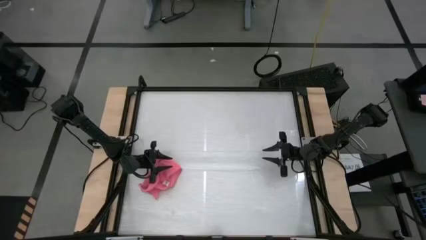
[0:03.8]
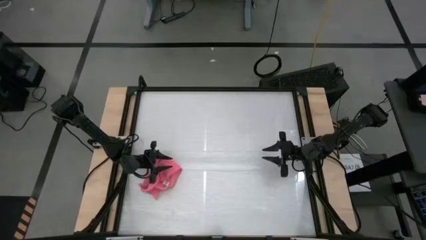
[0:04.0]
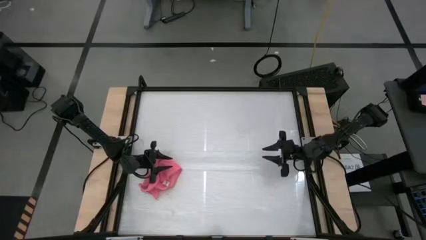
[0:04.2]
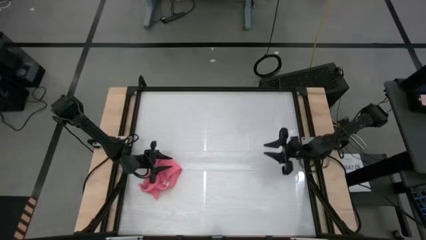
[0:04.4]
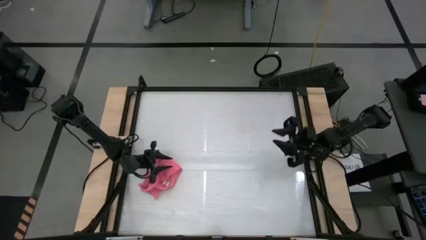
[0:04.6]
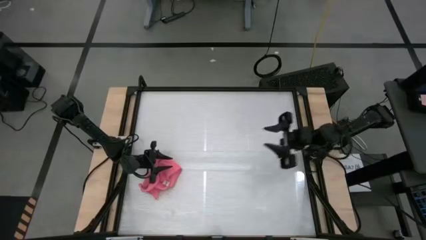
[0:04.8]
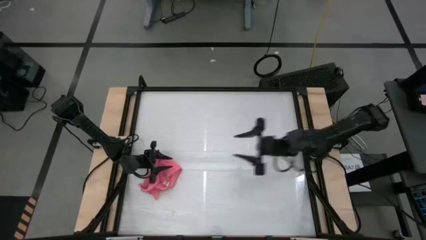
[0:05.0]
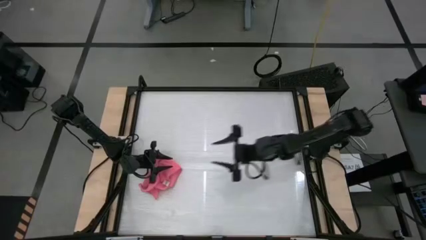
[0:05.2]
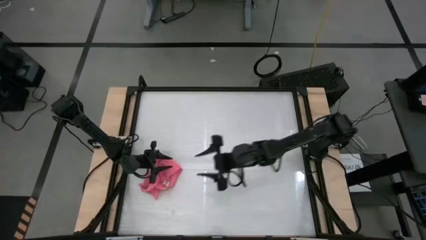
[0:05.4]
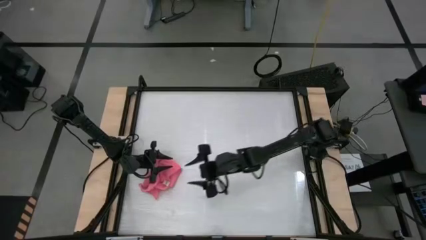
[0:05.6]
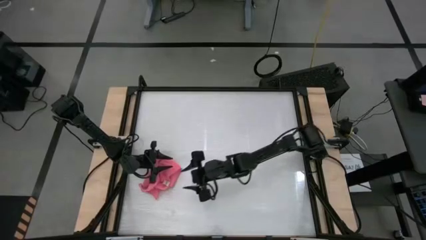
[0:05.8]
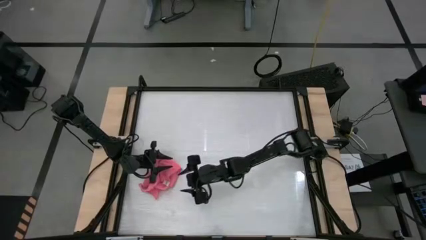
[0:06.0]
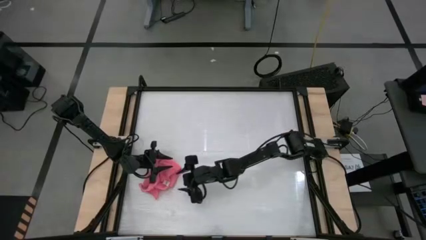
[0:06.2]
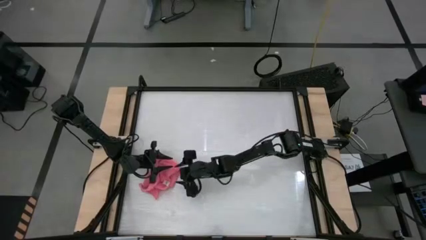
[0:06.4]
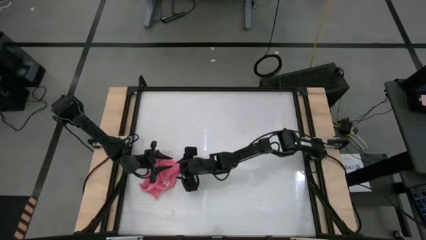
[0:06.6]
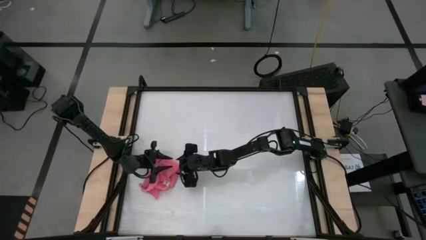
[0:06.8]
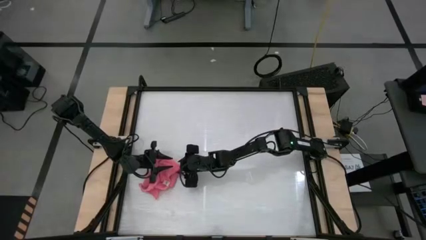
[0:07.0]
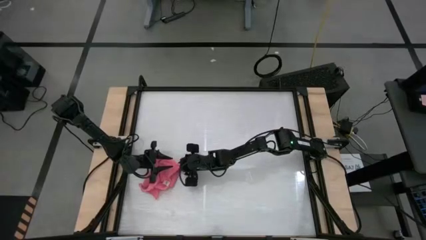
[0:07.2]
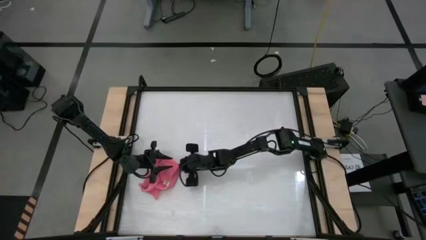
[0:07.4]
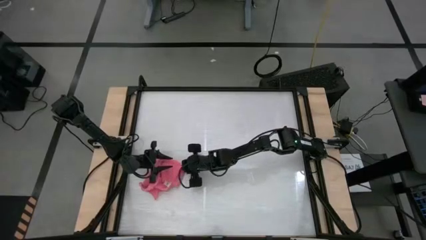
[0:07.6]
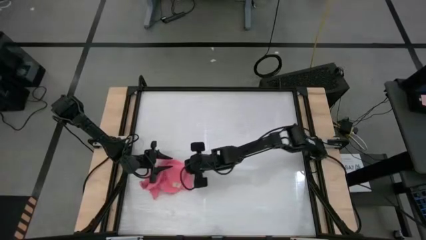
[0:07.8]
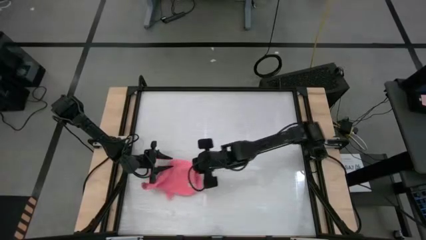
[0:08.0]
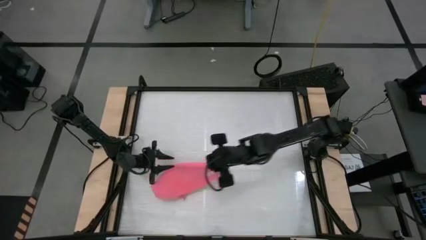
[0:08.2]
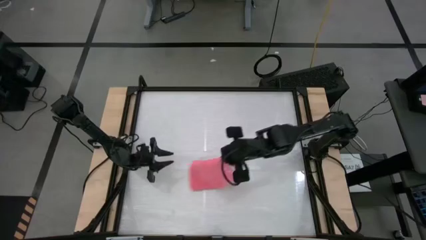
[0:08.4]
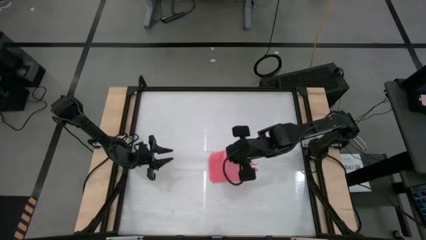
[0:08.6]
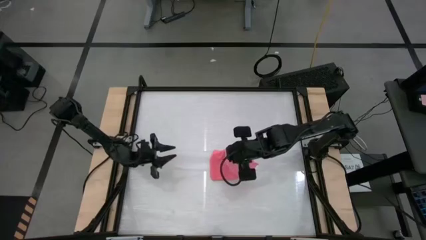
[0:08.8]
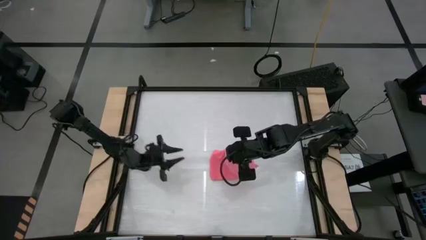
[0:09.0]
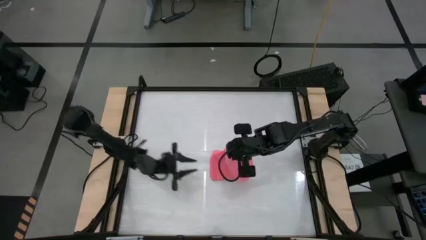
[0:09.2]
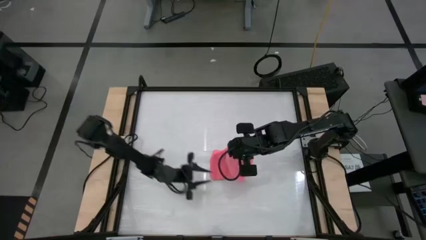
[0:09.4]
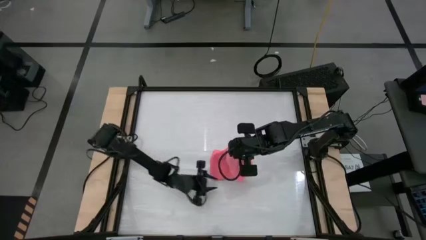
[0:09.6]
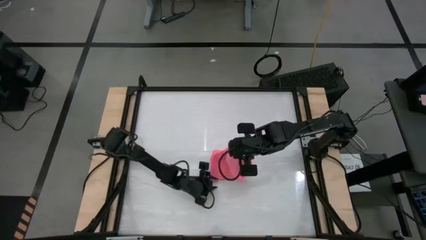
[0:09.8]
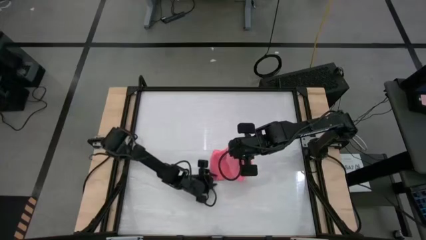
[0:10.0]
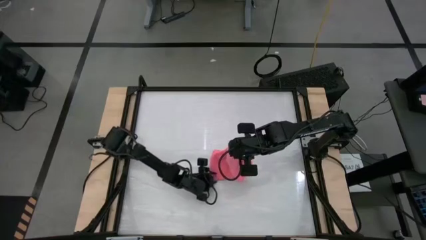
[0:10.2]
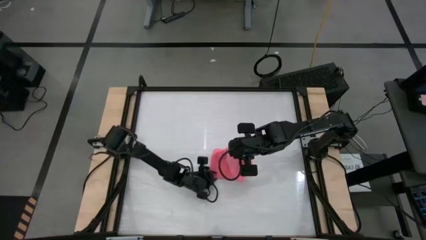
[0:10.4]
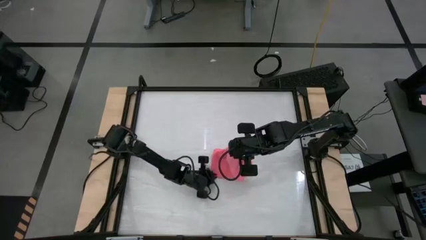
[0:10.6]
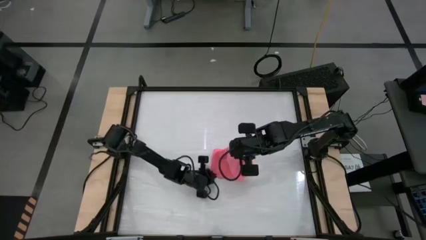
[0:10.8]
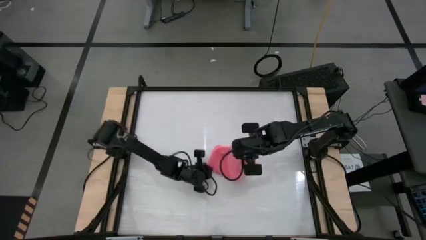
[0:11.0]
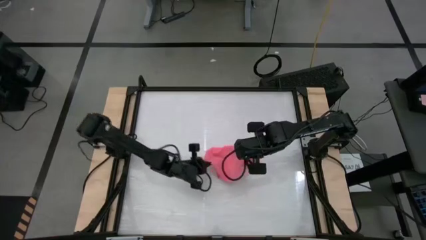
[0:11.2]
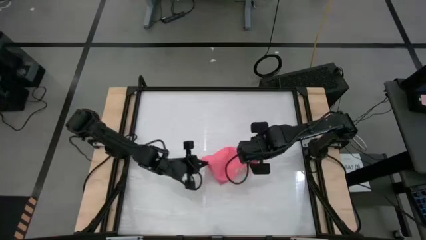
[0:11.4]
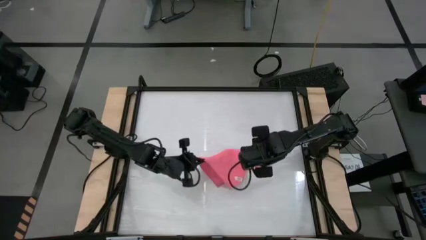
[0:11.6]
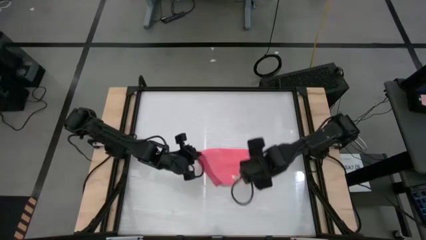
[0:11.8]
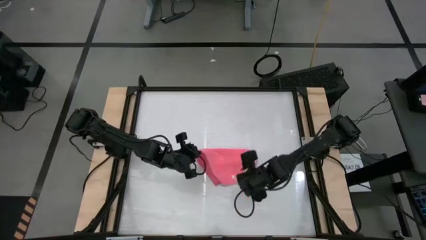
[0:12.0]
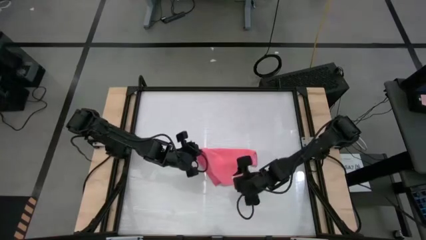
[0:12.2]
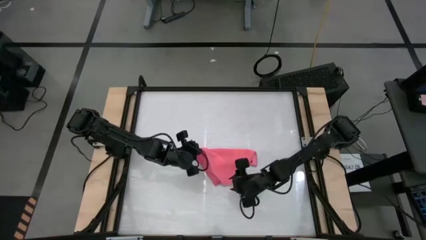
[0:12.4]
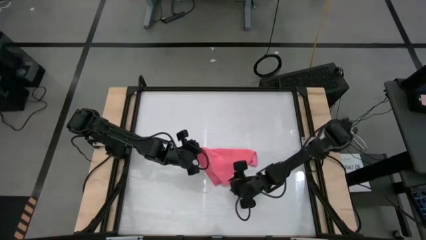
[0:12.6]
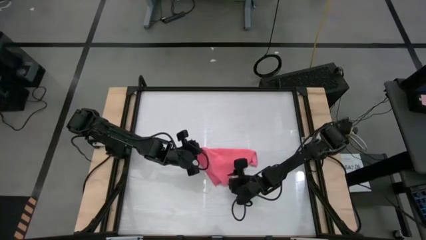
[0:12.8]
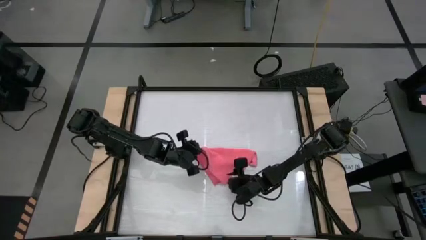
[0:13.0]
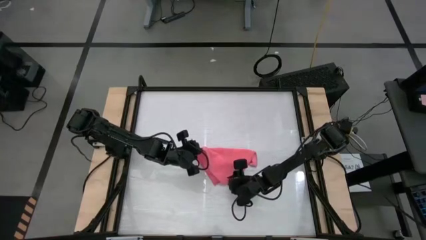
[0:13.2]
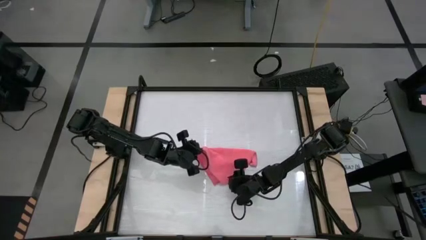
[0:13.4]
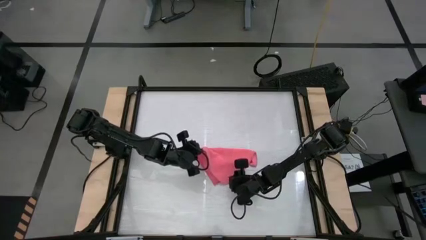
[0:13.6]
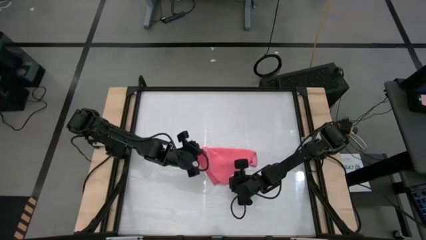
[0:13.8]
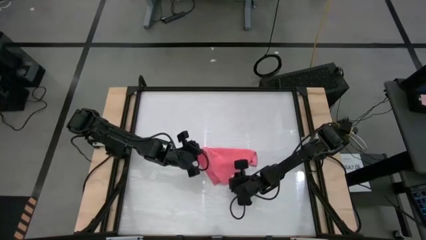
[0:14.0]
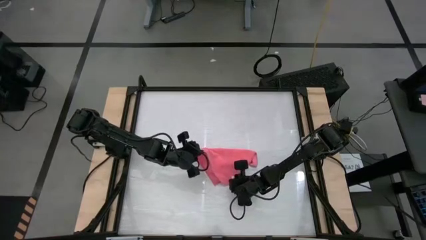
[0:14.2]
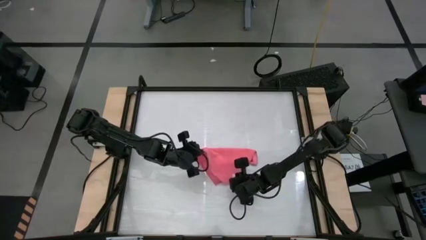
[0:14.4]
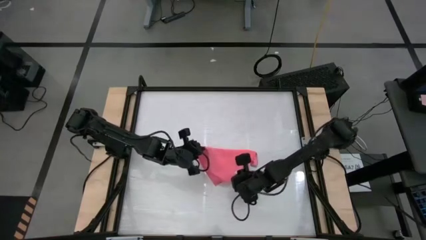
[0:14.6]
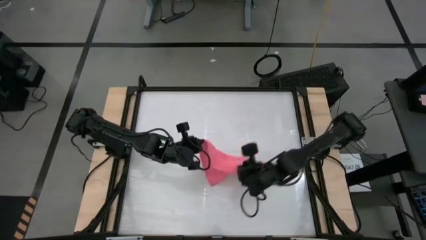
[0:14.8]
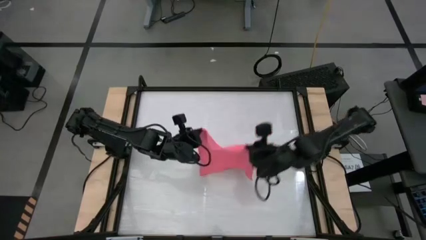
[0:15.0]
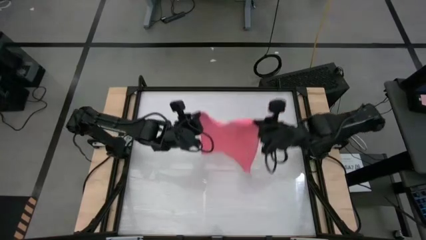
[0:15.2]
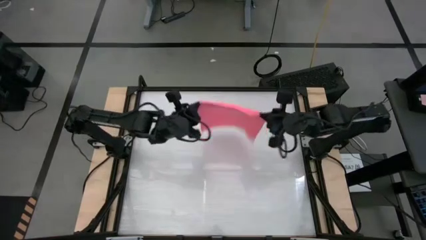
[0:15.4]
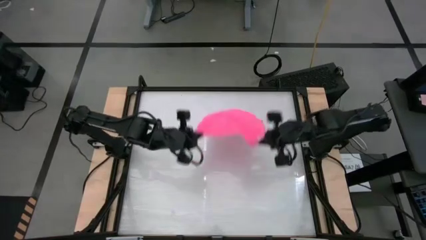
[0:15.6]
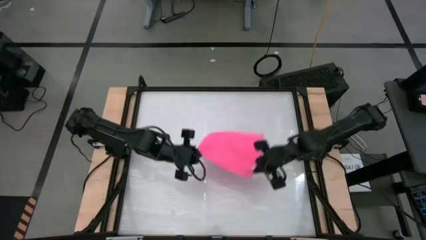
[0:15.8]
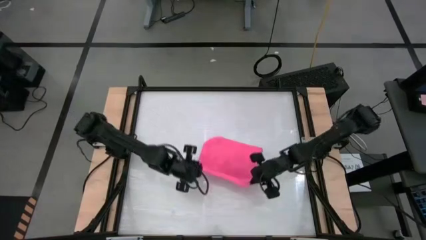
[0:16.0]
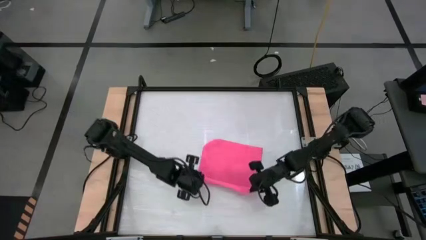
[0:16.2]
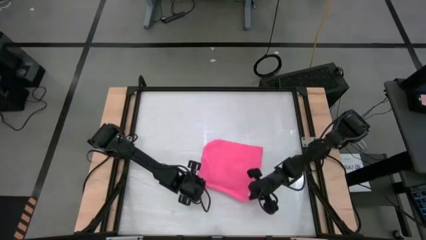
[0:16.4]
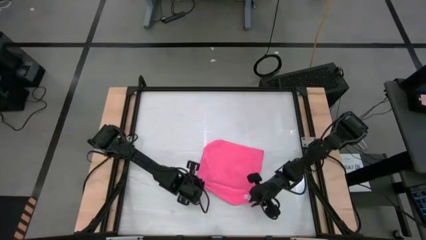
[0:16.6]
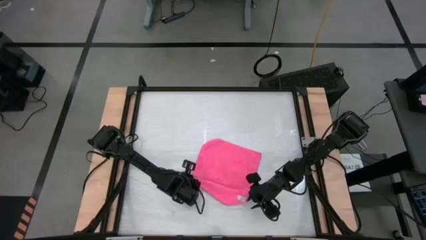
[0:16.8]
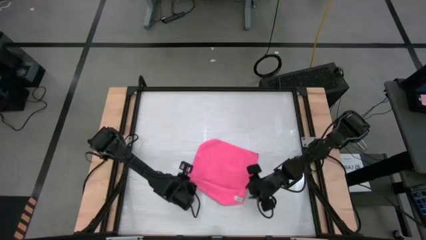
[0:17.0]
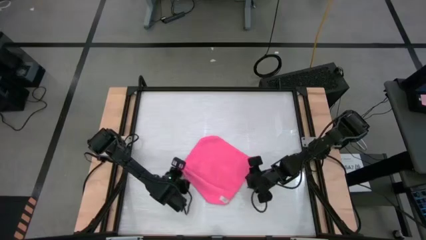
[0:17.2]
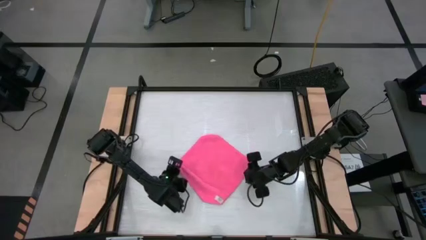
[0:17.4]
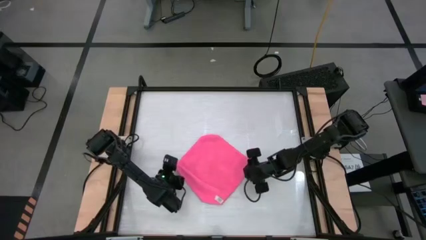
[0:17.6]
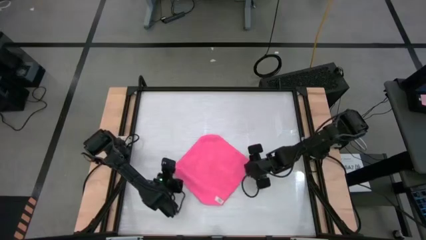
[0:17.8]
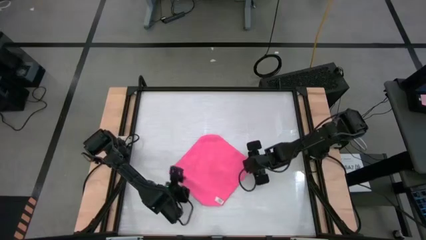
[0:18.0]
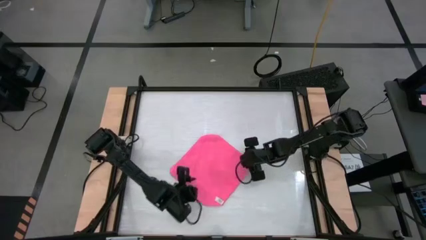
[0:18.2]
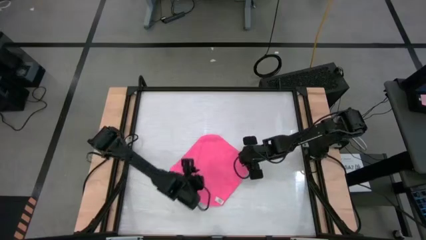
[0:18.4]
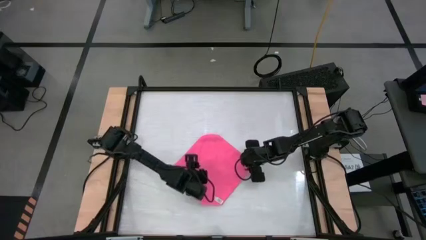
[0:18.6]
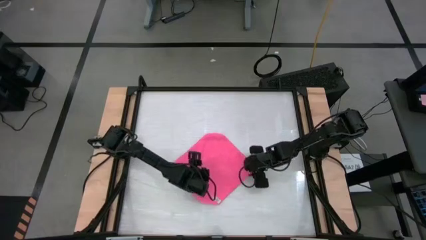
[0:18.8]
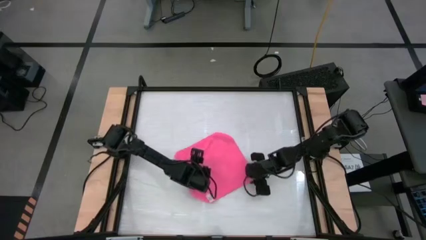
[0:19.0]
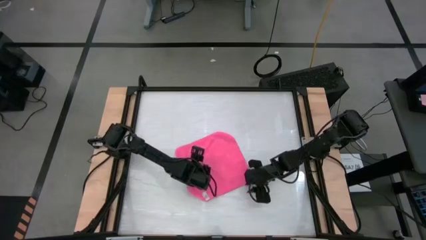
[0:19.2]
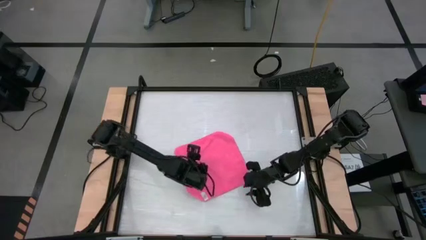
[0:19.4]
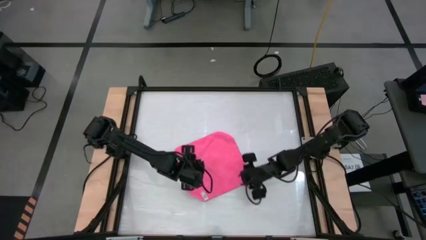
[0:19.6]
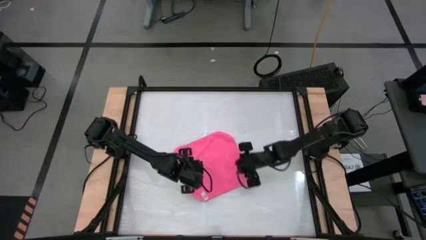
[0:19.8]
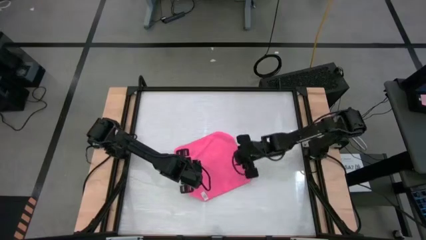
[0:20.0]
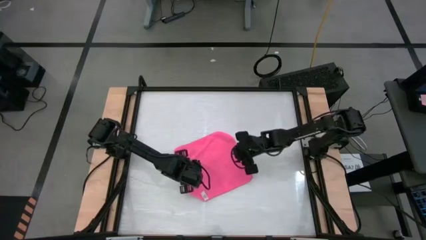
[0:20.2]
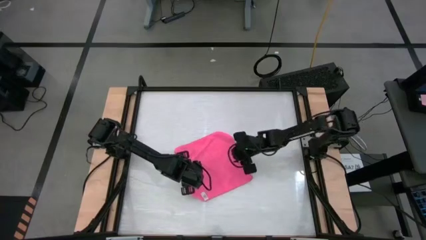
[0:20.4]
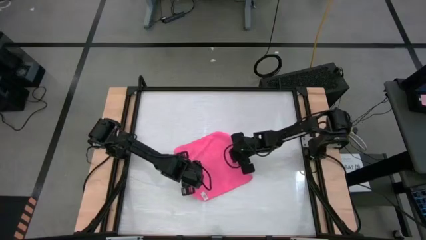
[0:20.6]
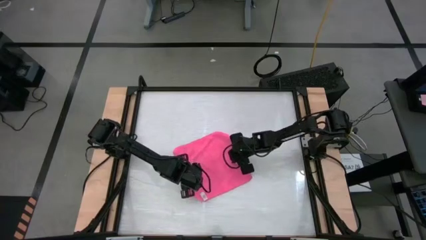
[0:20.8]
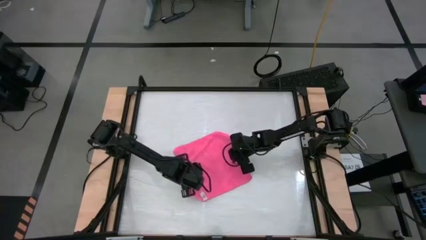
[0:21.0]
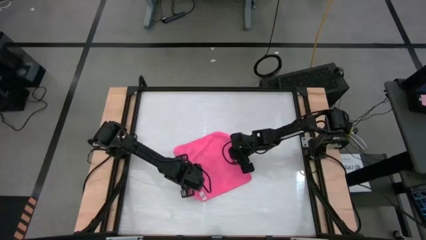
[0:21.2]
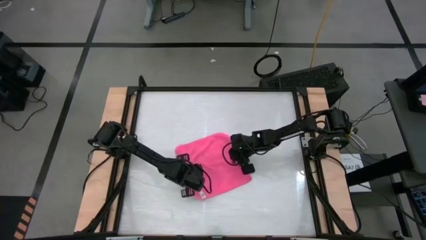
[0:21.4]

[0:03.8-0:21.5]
Task: Roll towel
Fold the pink towel
